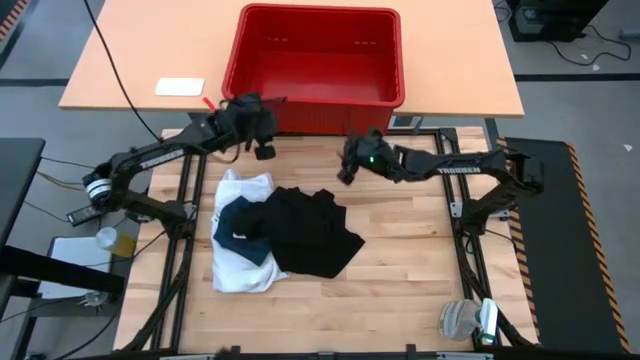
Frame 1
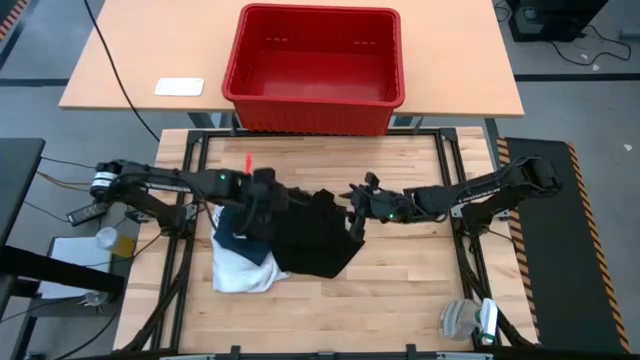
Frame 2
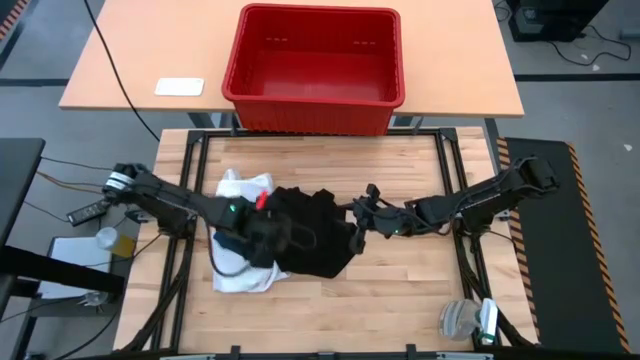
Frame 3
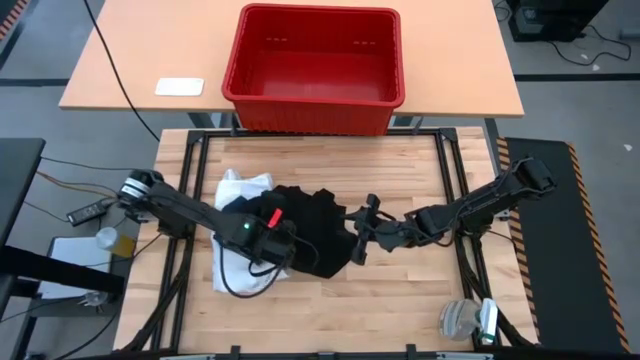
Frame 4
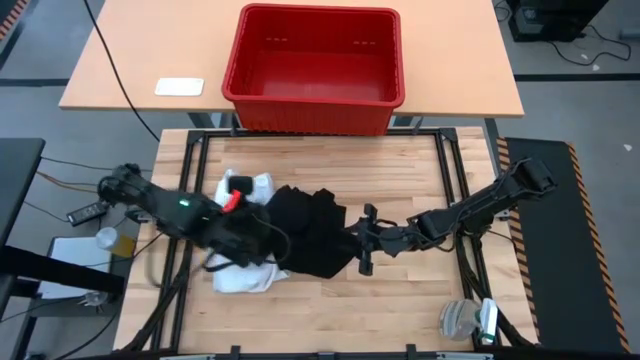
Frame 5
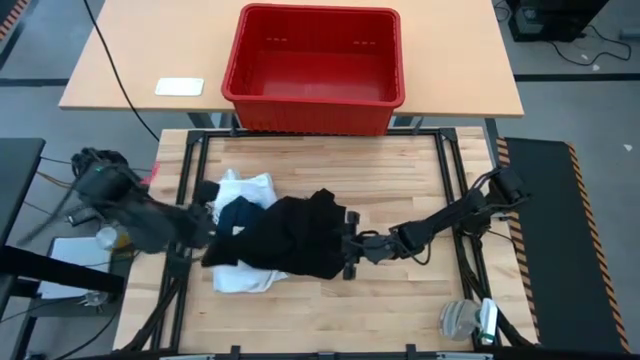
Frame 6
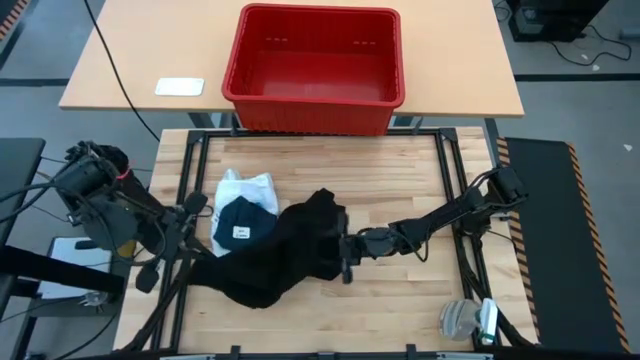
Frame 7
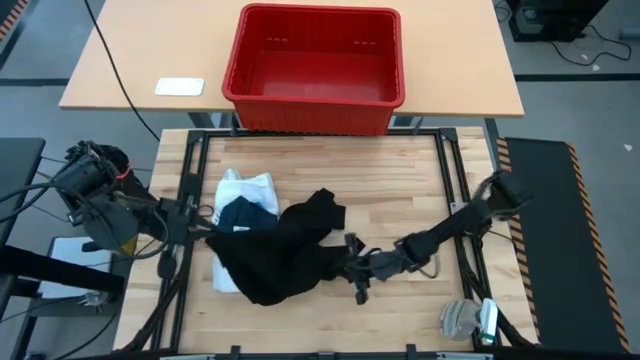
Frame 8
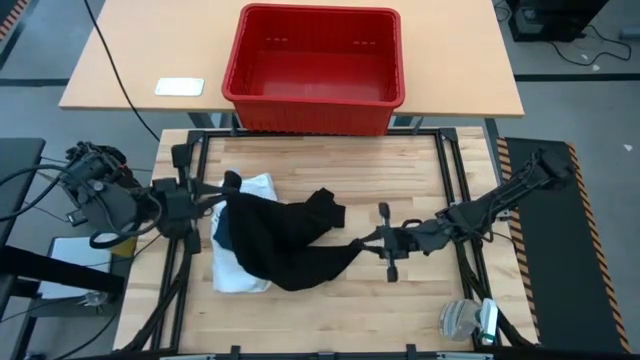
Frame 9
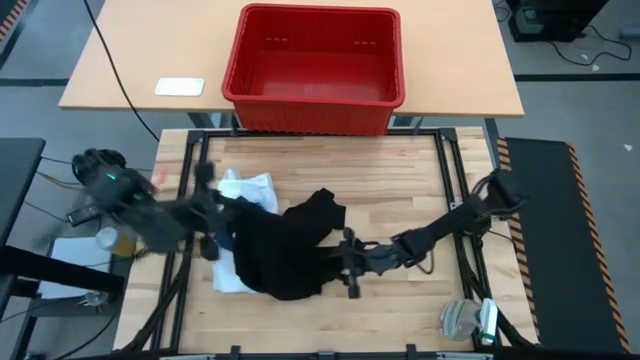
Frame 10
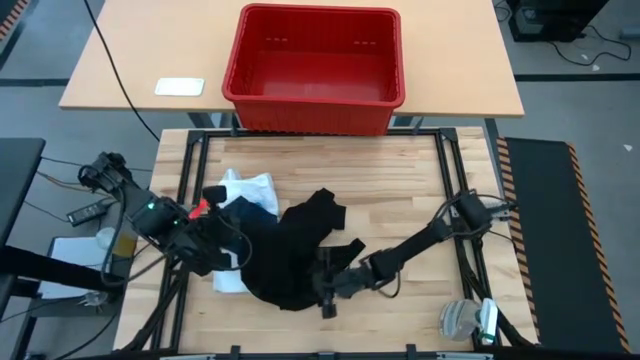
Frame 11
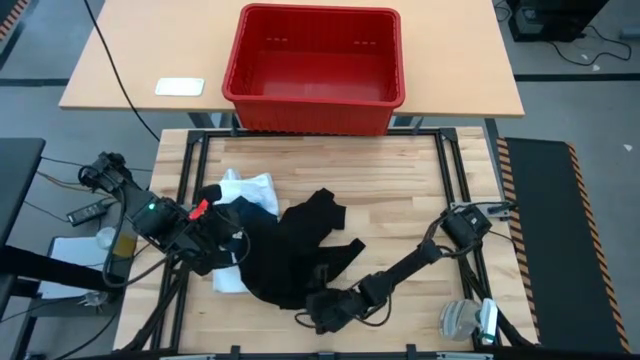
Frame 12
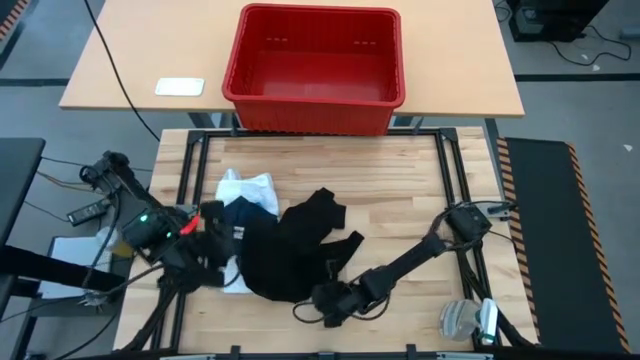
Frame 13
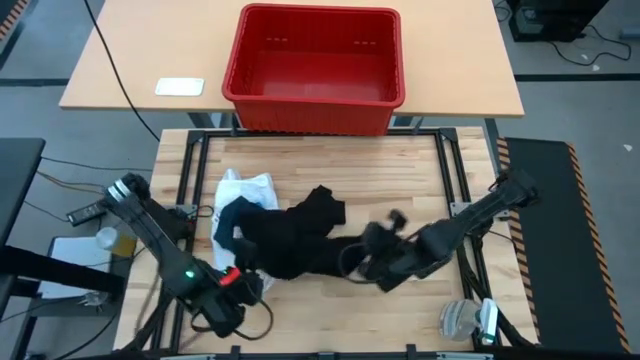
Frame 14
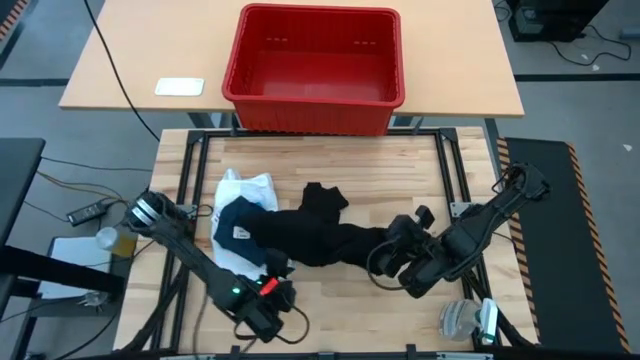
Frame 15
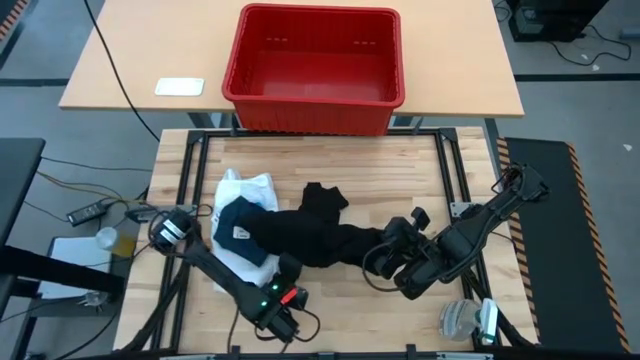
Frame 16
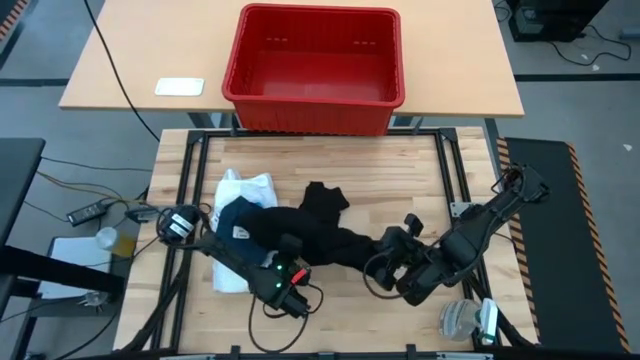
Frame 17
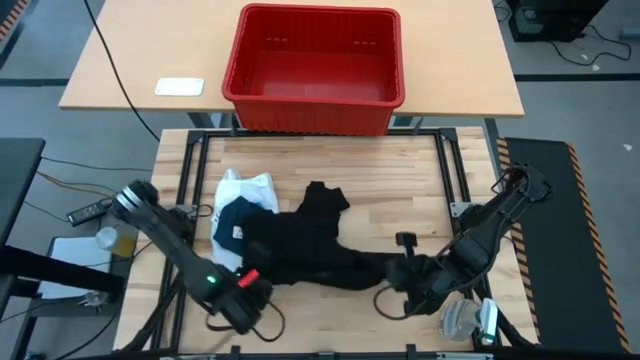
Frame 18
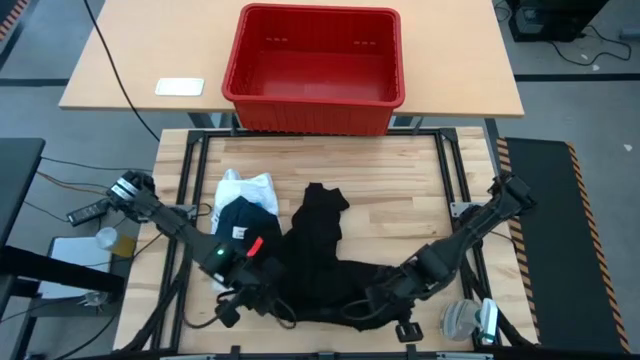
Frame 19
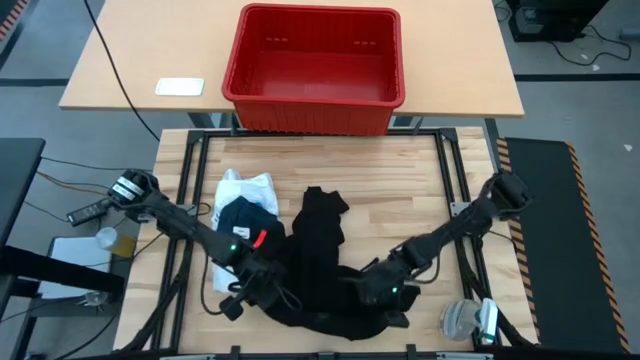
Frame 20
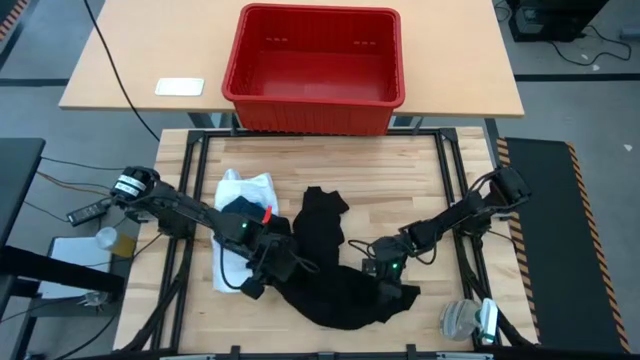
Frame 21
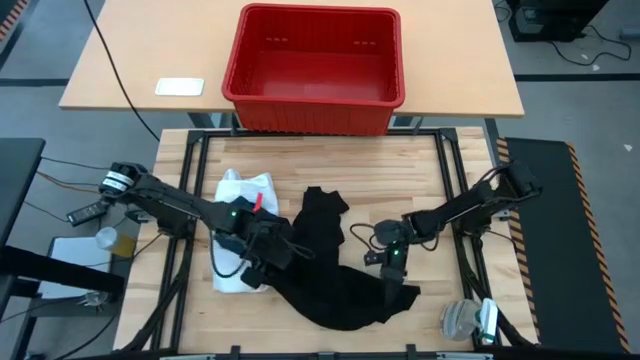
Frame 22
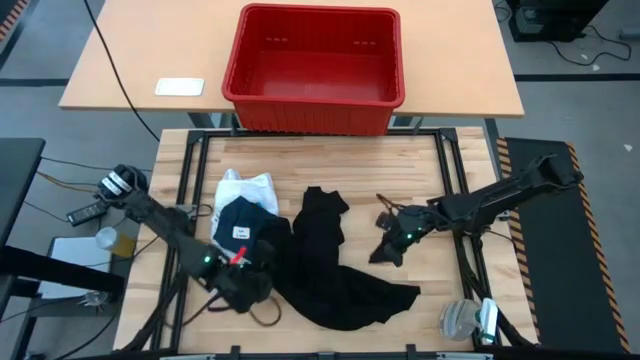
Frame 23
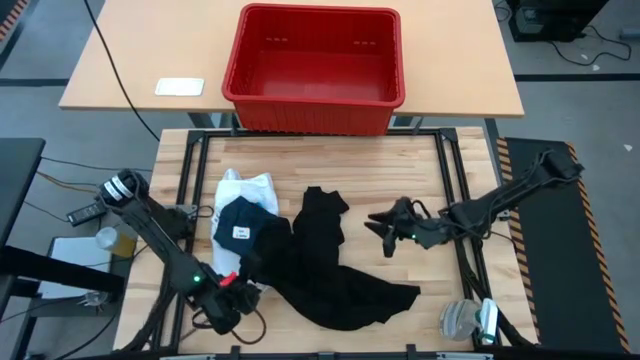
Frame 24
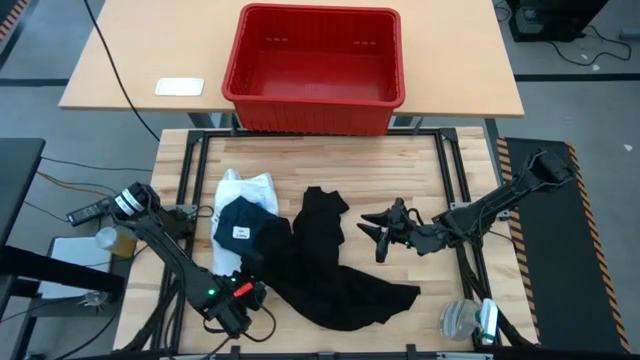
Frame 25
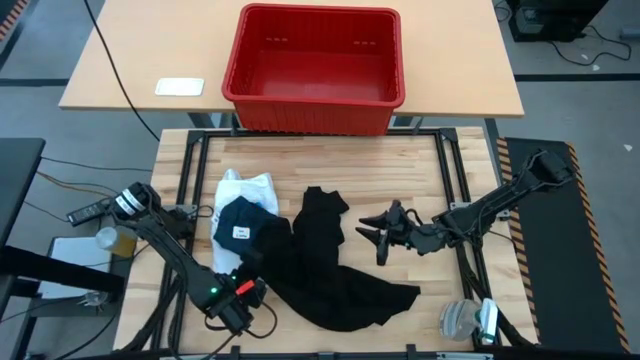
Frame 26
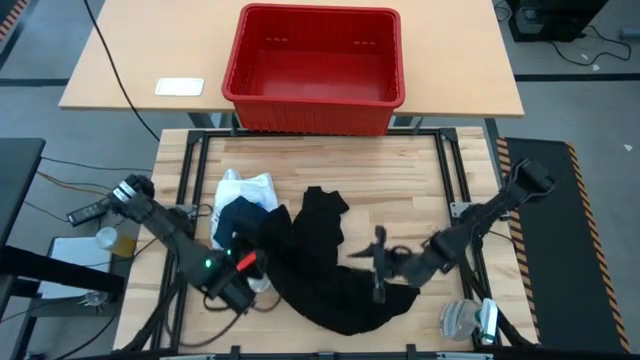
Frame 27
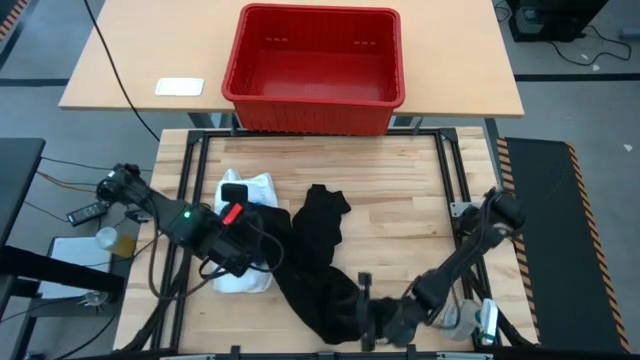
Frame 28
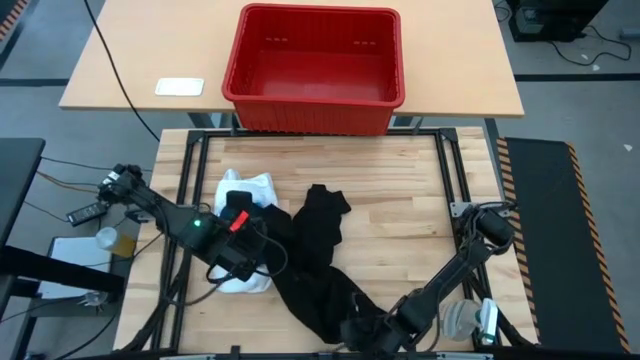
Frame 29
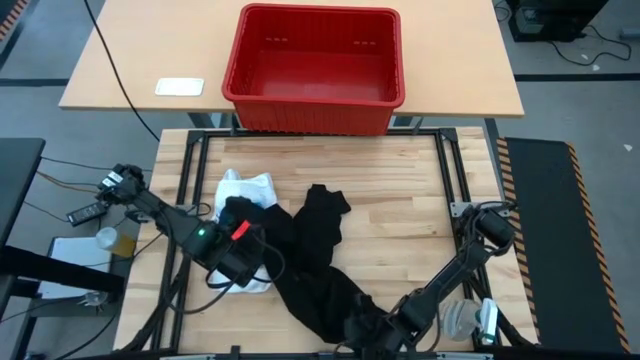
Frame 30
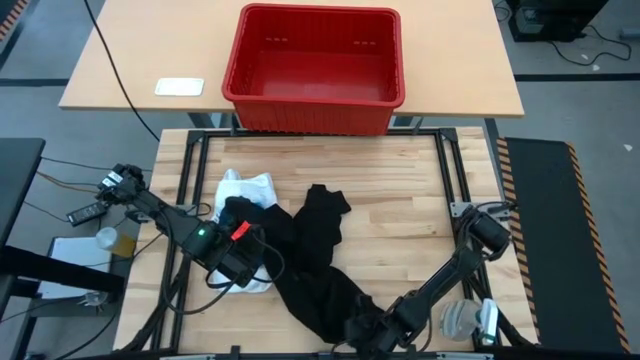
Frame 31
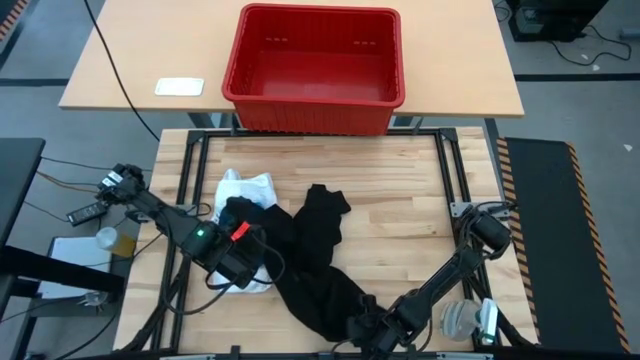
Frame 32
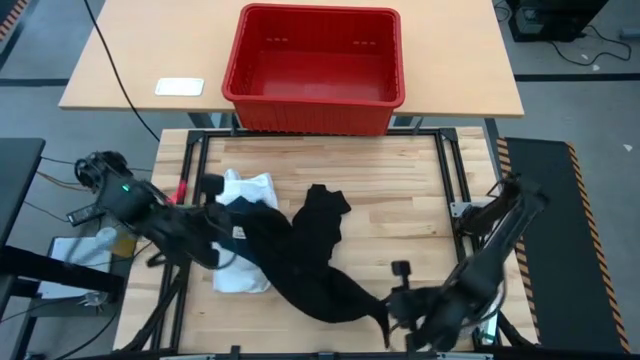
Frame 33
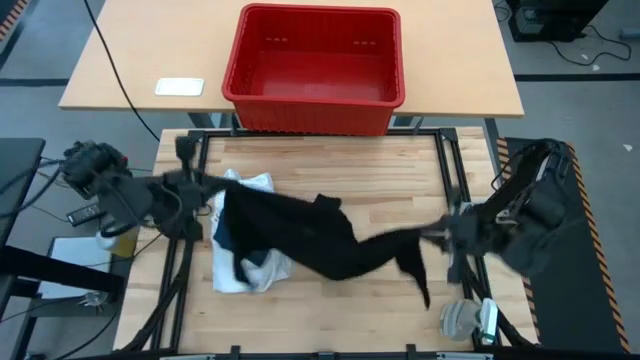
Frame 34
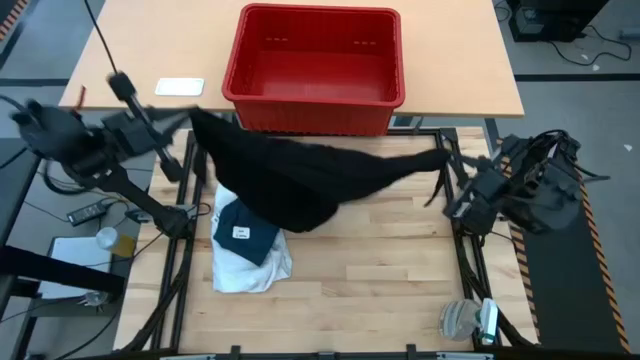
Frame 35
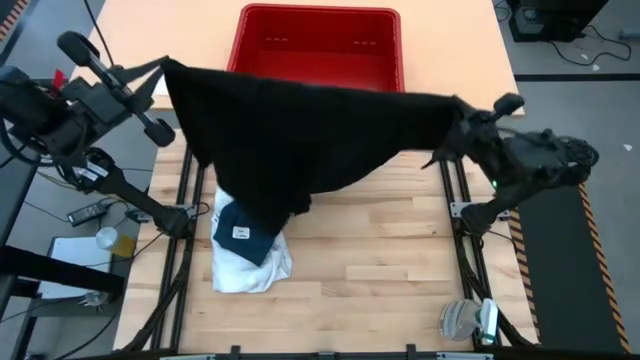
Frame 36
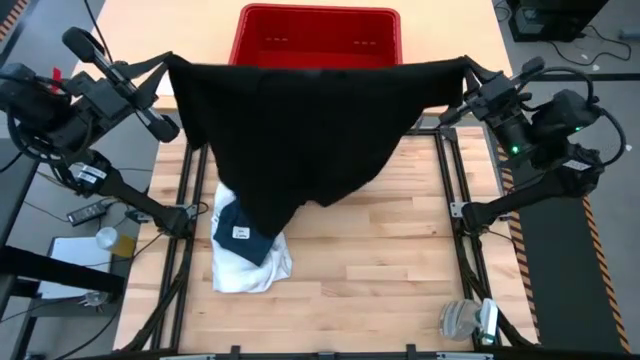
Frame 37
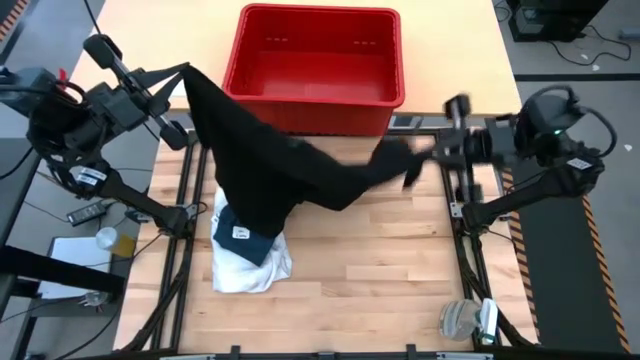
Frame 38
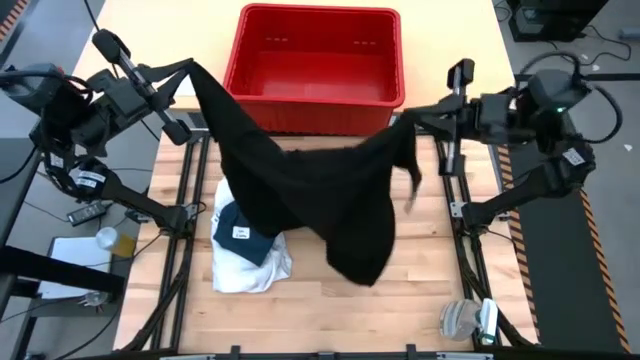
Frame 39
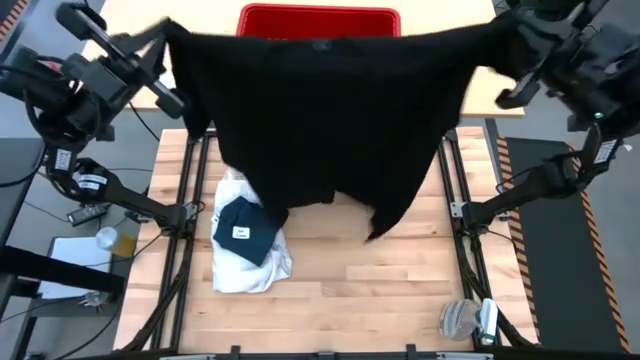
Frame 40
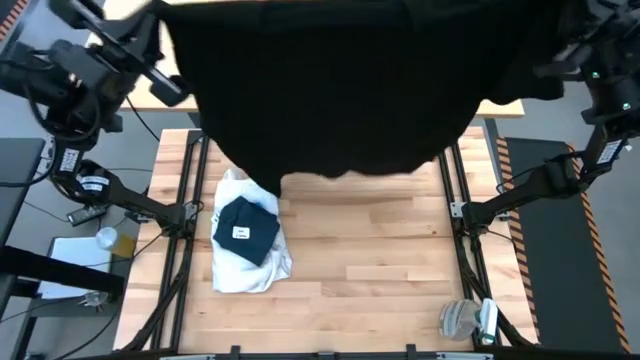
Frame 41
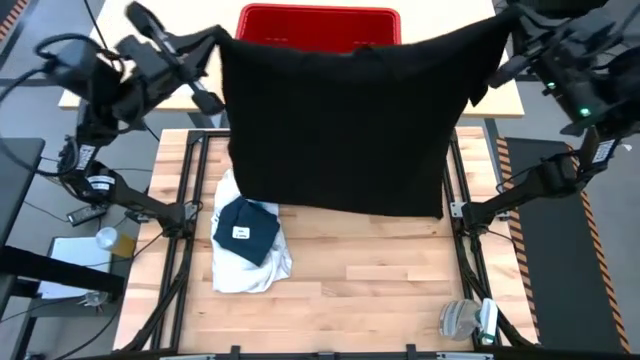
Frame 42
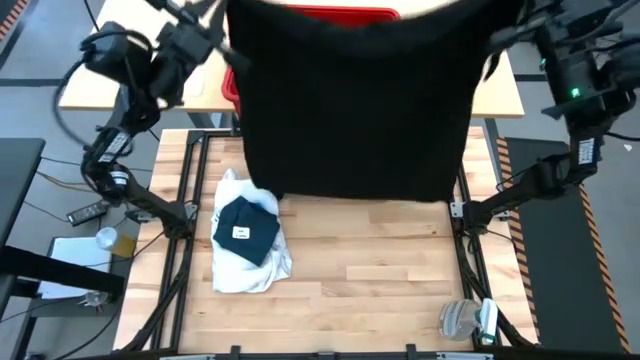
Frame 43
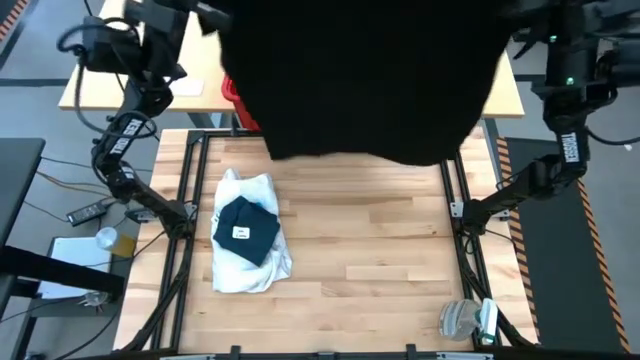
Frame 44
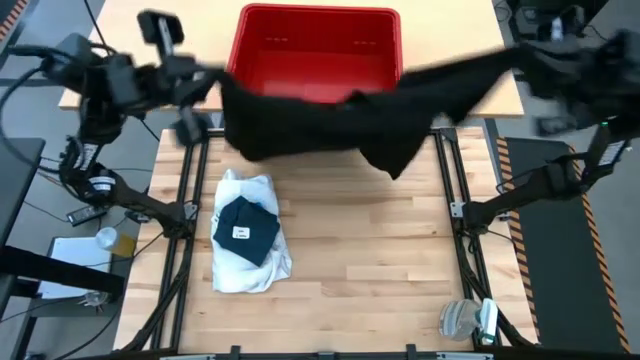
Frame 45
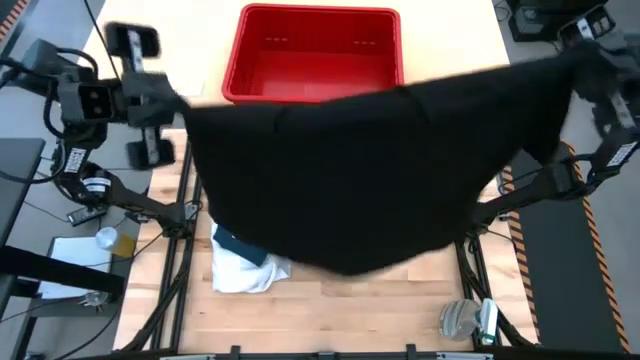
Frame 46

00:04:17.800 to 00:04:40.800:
Task: Fold laundry
Fold the black shirt
